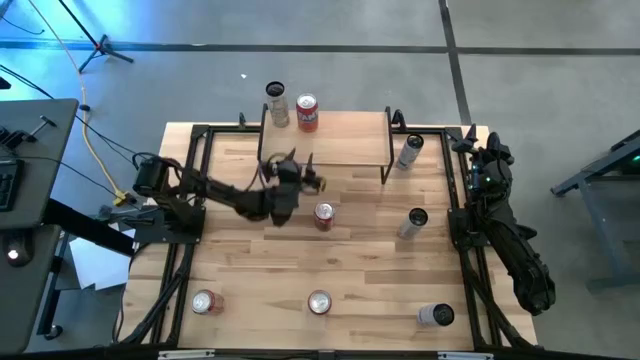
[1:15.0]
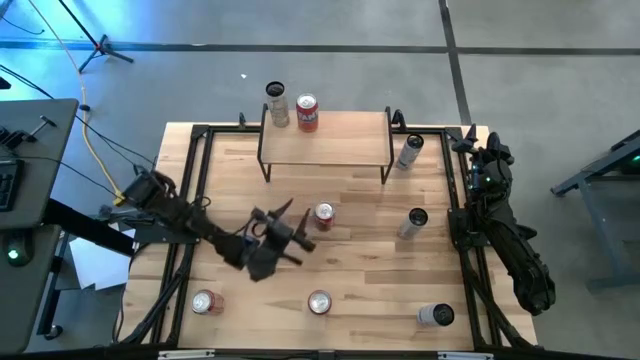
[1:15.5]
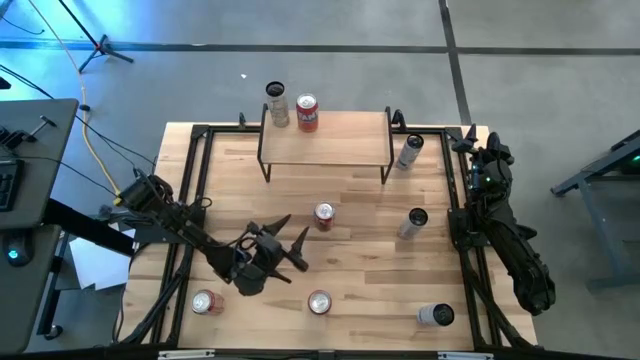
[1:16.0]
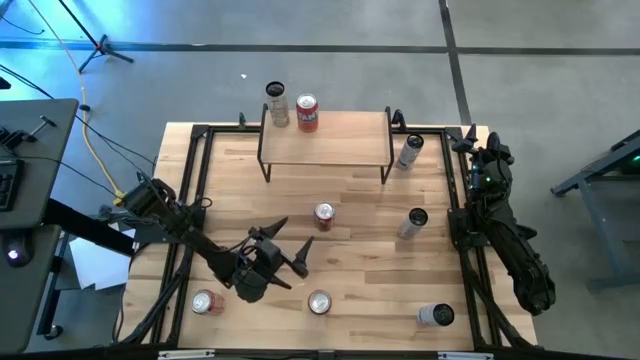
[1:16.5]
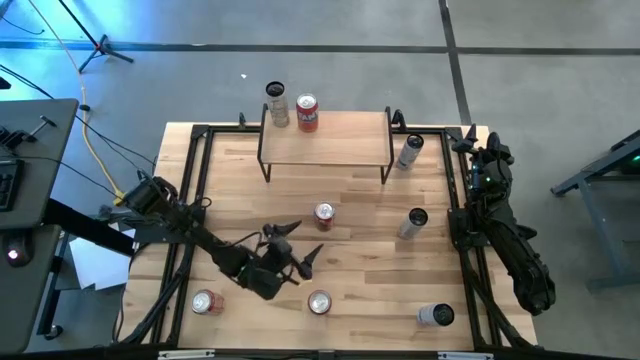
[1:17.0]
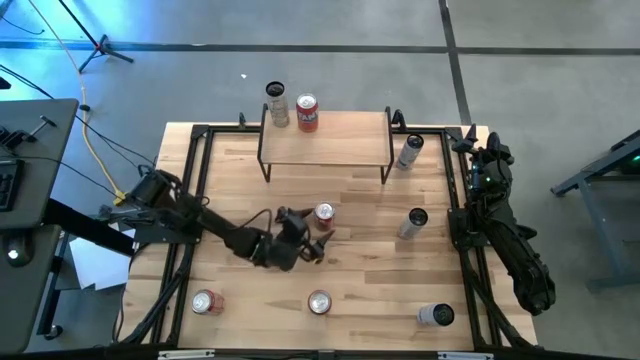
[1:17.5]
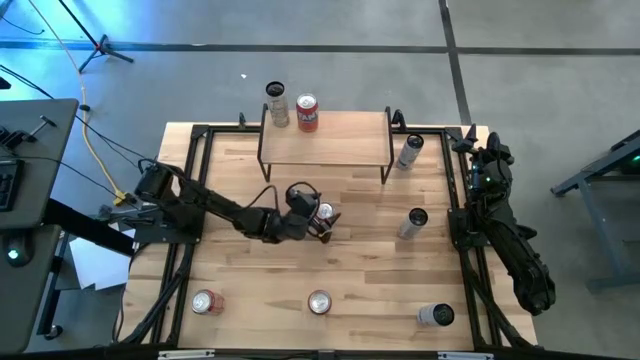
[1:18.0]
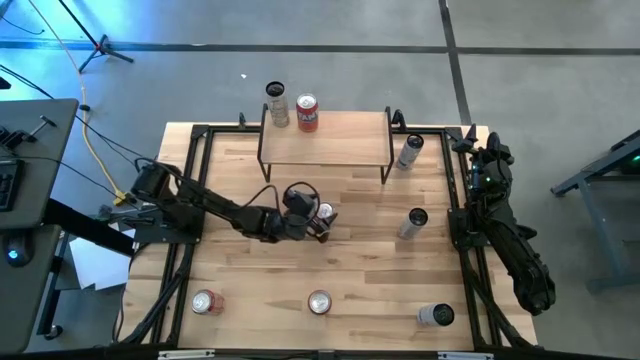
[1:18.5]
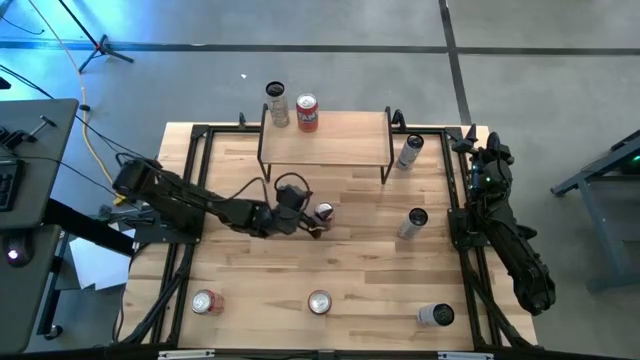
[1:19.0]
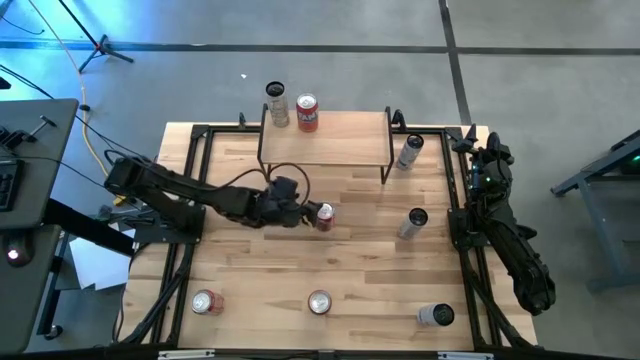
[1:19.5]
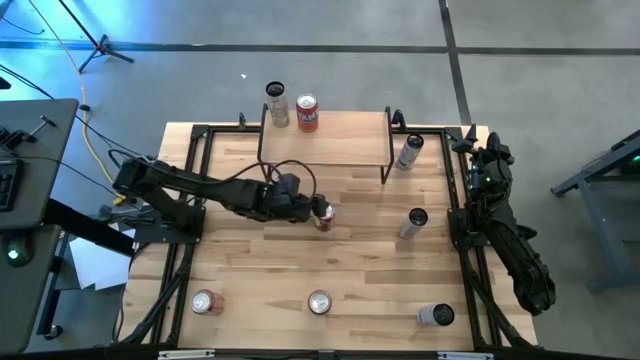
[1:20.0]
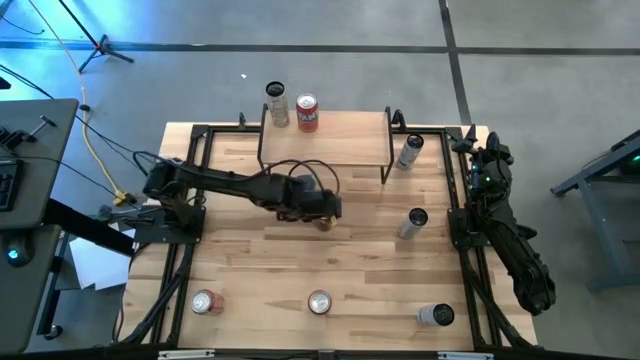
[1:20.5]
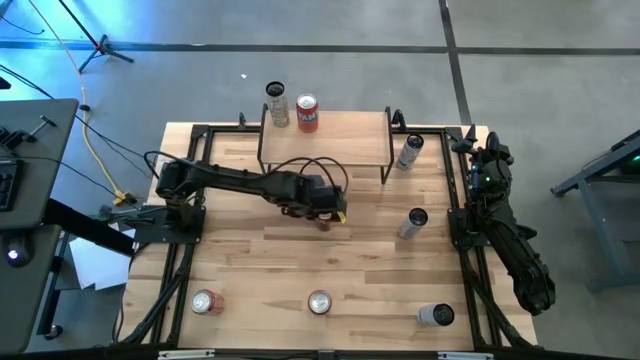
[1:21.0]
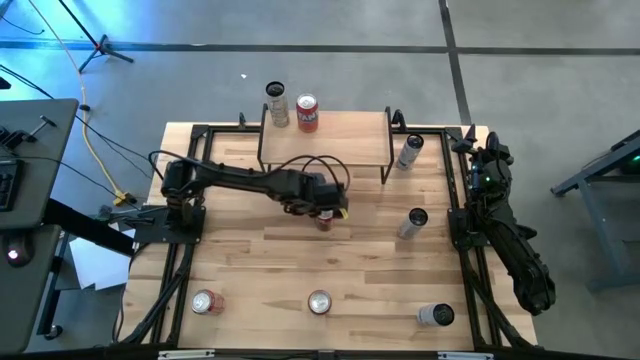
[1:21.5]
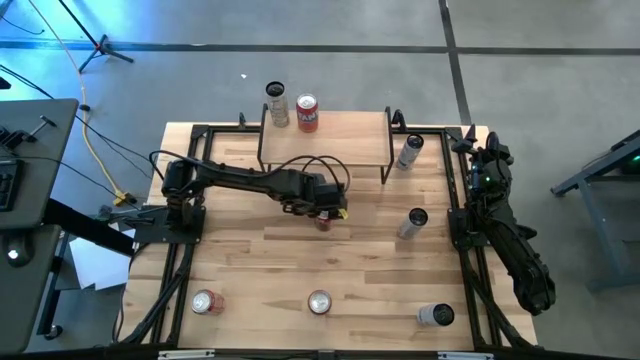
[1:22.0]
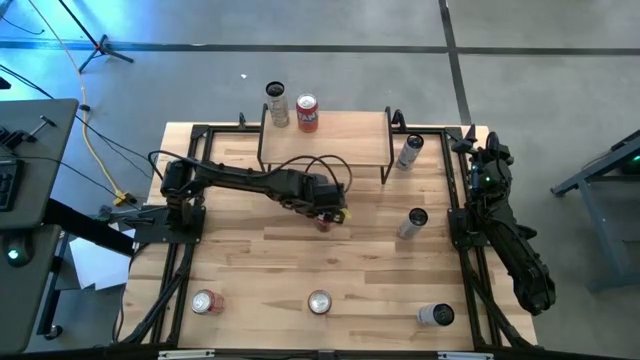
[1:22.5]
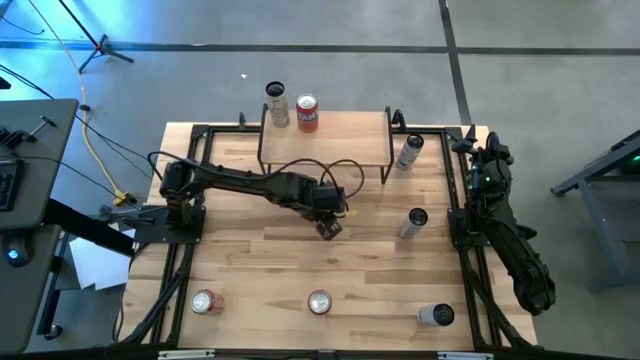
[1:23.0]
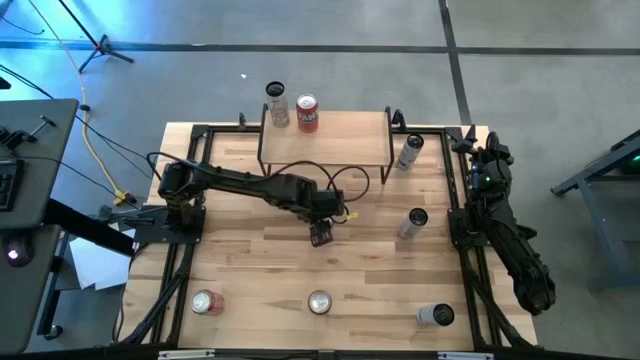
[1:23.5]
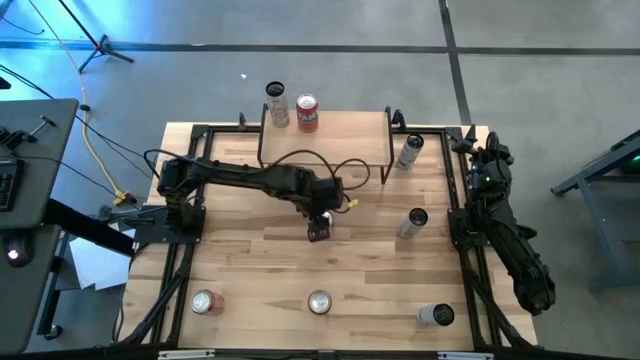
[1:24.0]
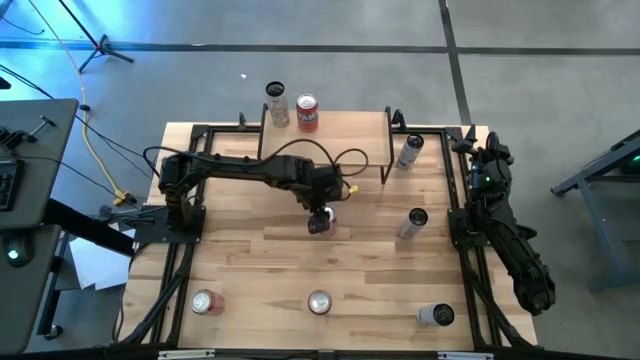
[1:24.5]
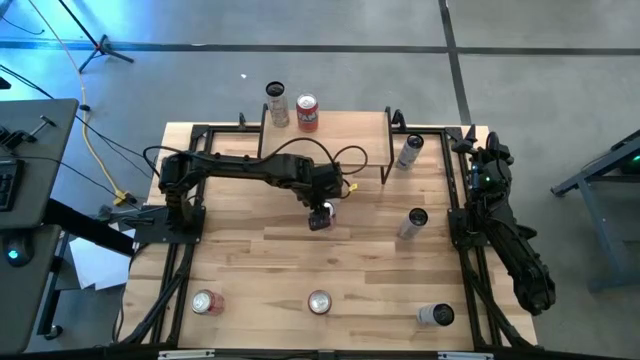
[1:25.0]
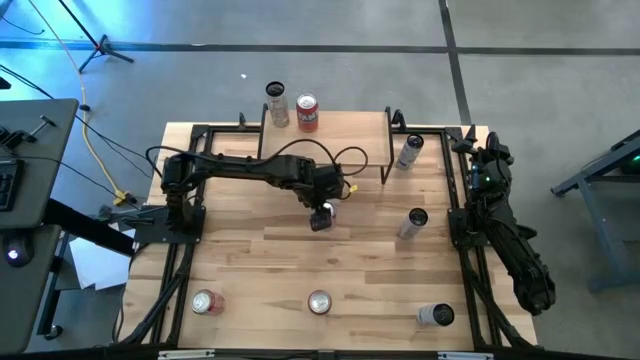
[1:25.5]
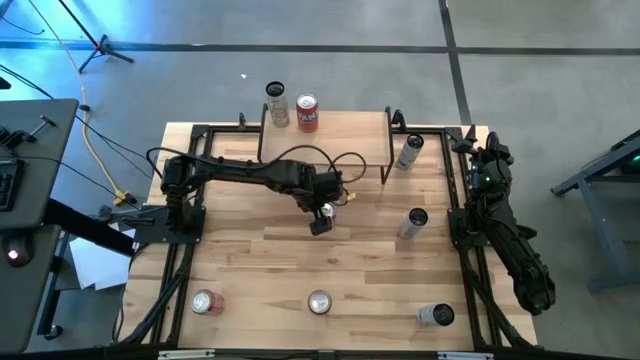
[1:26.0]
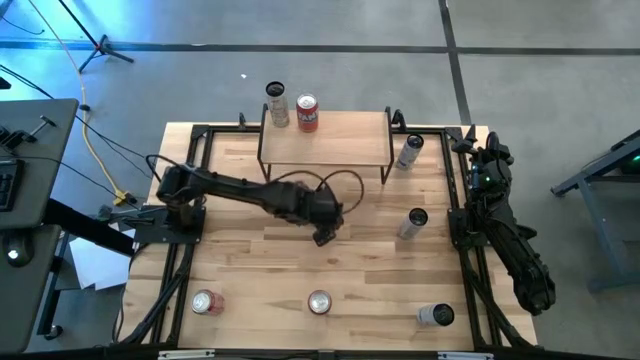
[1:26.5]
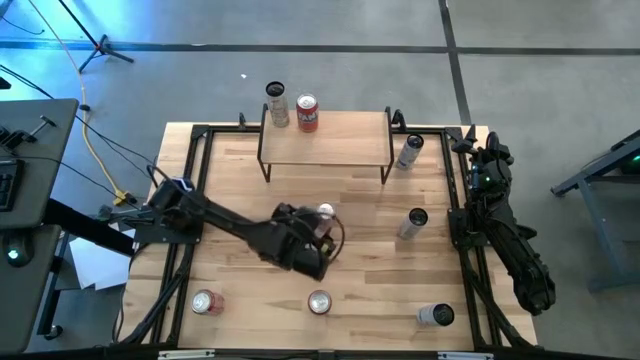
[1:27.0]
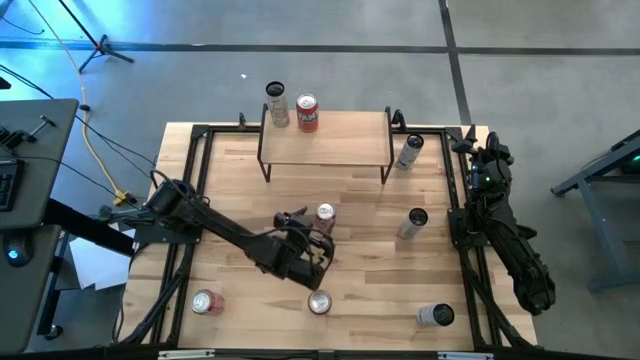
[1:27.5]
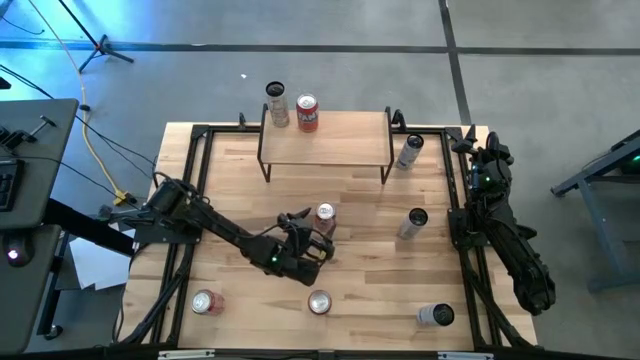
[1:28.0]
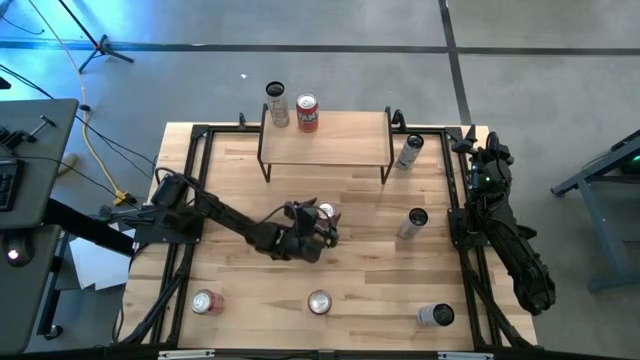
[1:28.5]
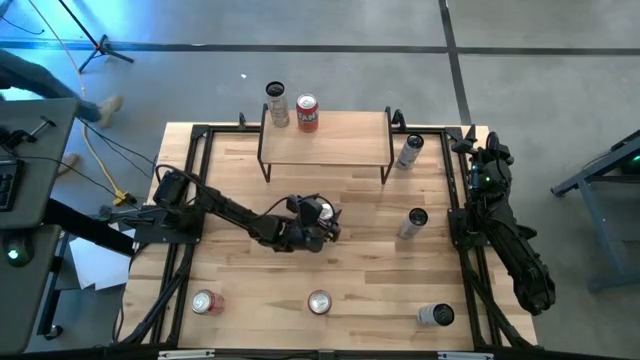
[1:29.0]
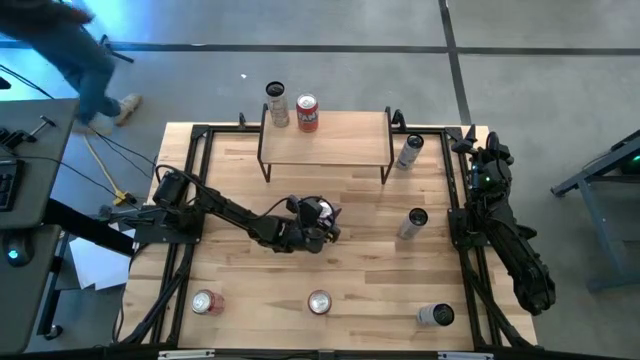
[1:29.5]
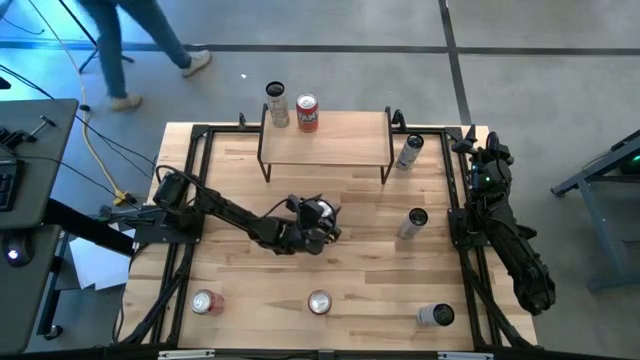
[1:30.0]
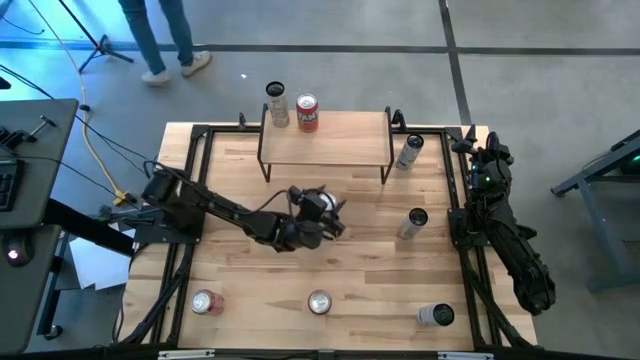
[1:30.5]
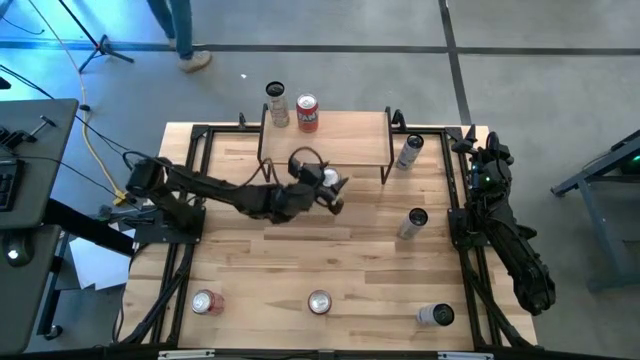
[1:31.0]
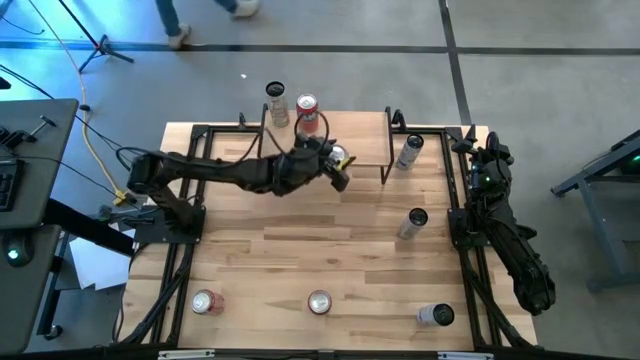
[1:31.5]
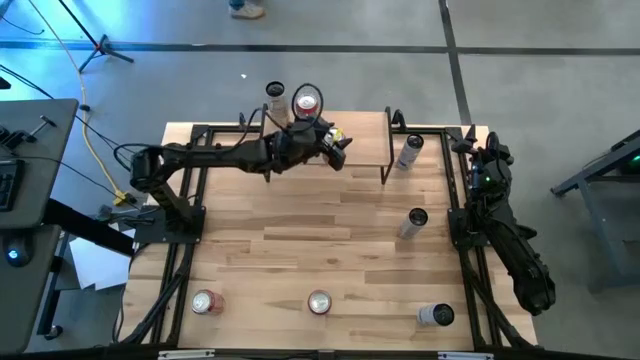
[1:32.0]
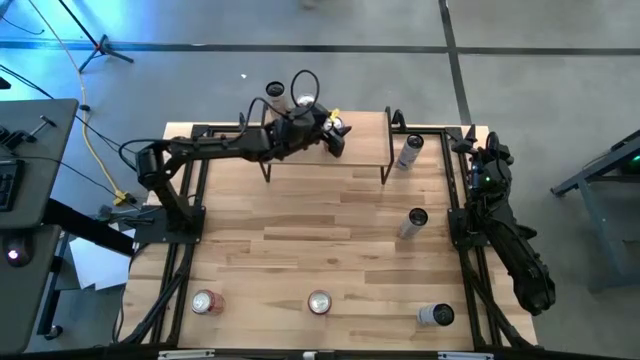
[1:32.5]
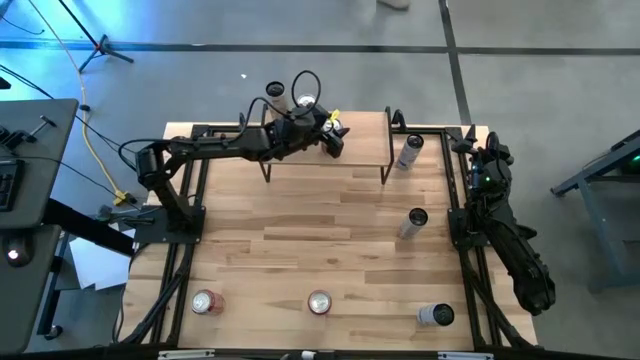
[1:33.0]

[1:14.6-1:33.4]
Task: Place canned beverage on shelf
Put the red and white soda can on the shelf

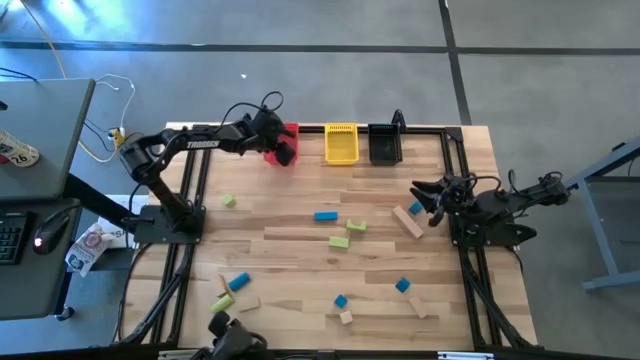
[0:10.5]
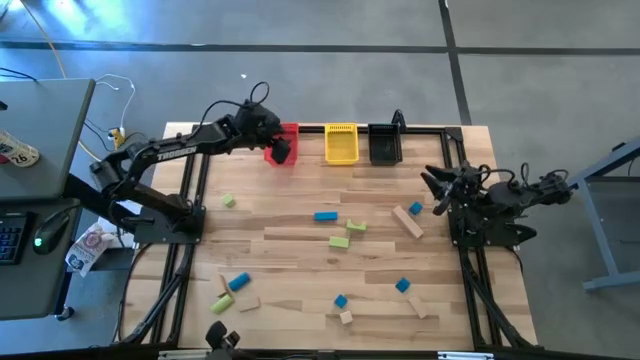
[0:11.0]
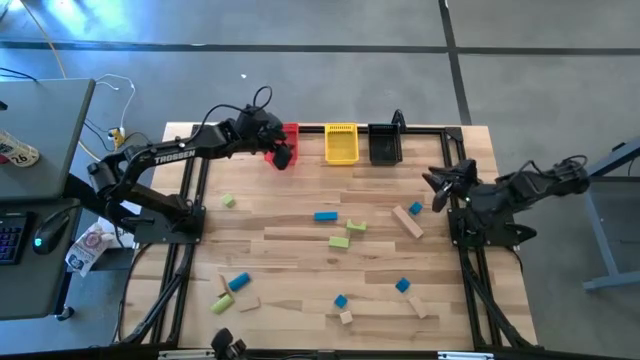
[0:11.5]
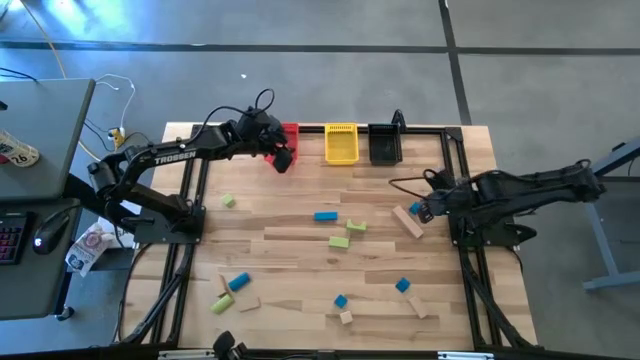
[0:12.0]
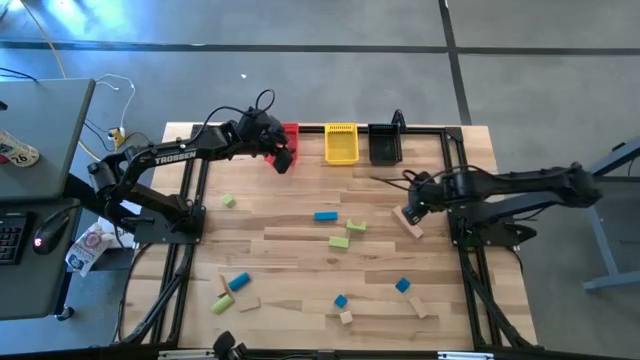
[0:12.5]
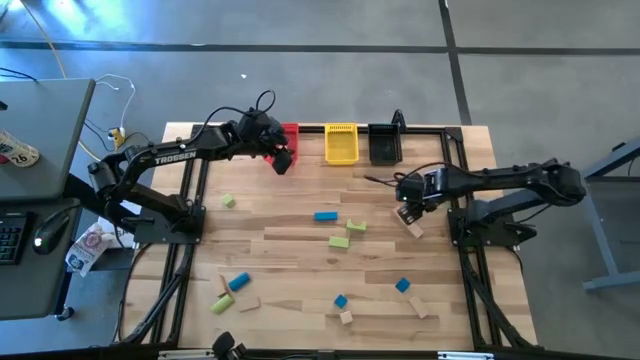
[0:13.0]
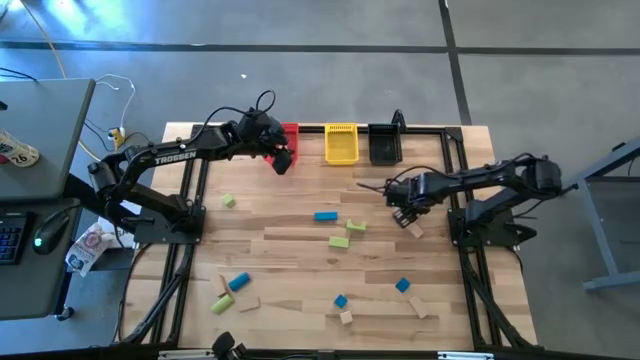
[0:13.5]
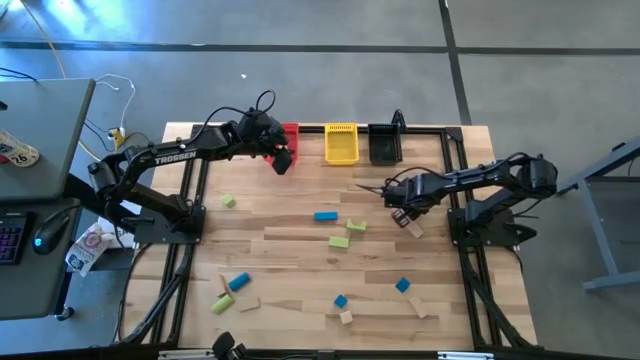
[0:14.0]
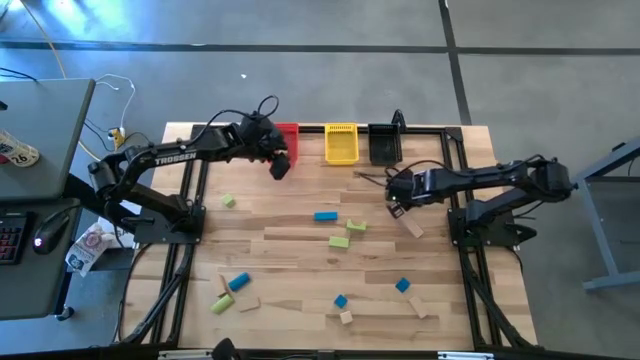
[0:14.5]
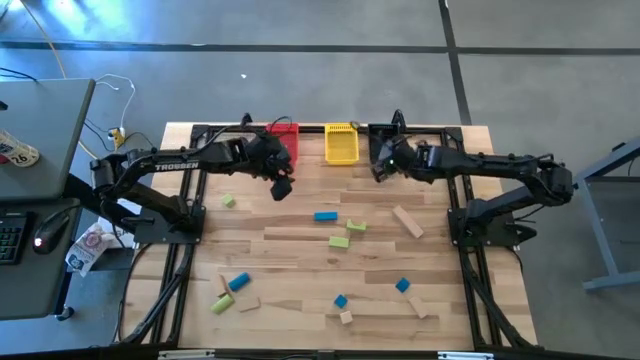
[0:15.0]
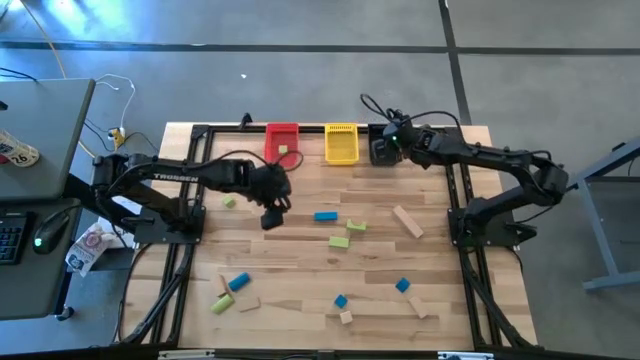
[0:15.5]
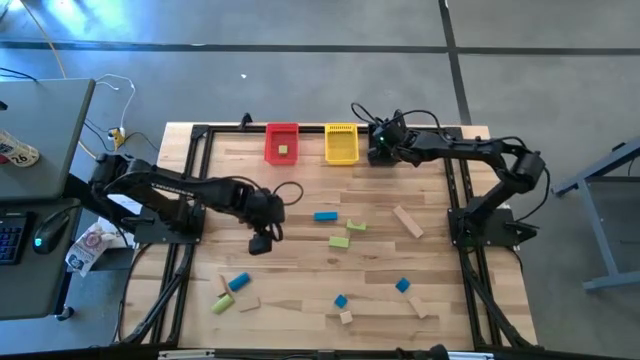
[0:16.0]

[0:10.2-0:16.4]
Task: Sort & place blocks by color
Put the blue block into the black bin
